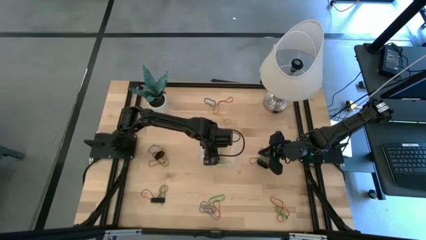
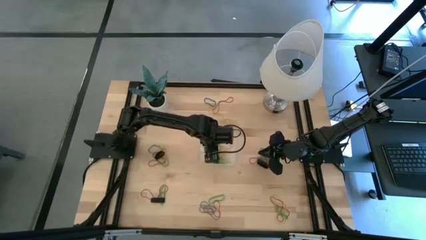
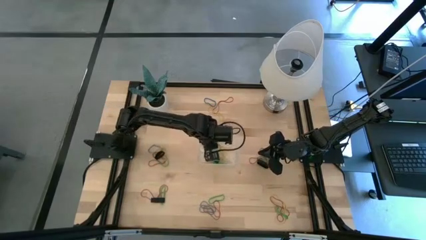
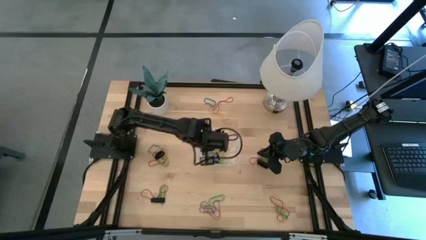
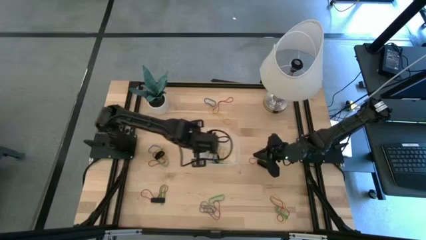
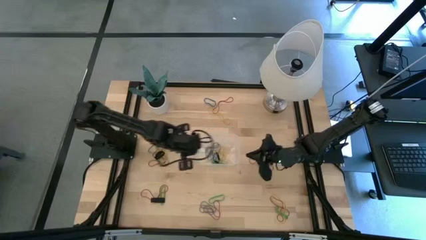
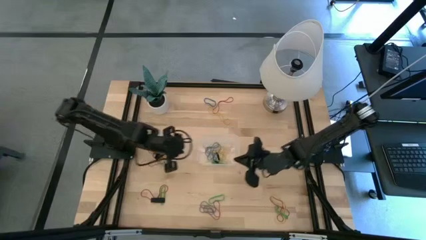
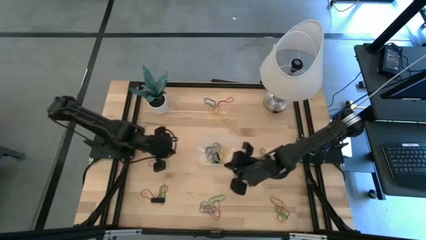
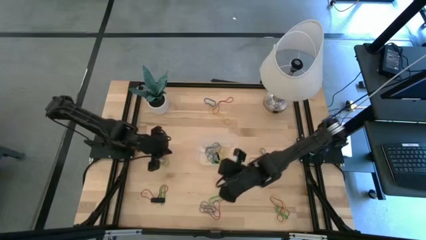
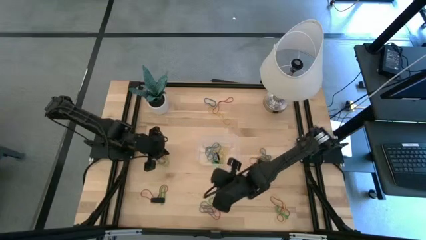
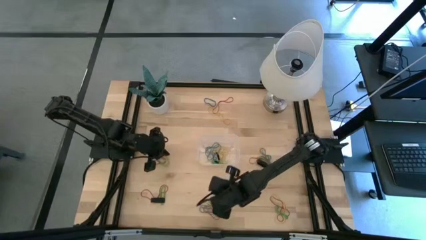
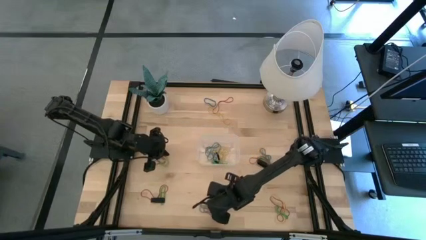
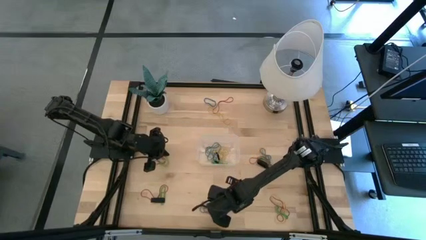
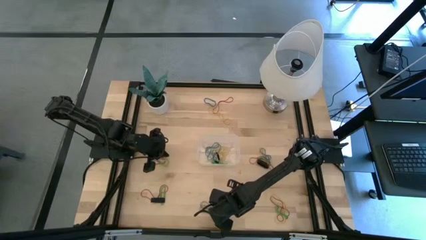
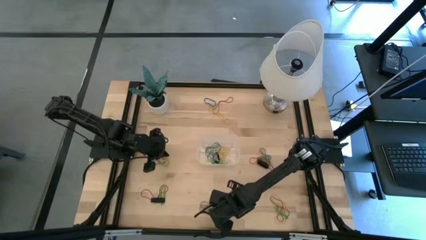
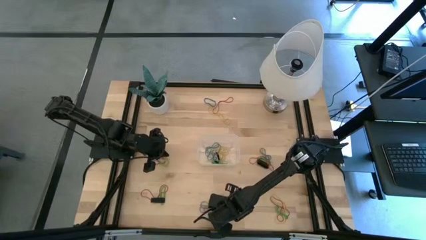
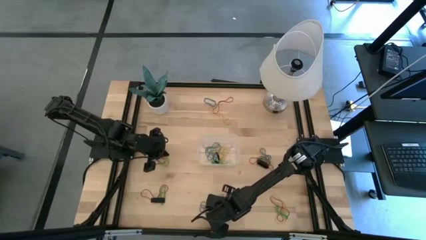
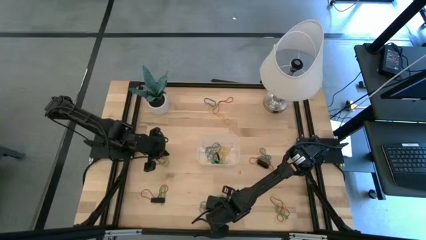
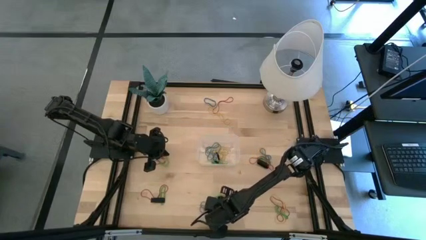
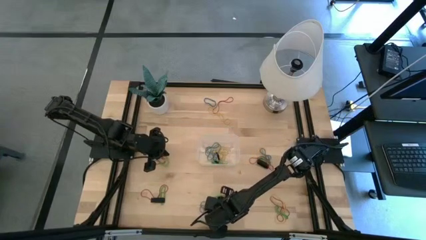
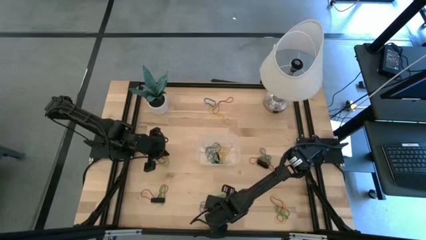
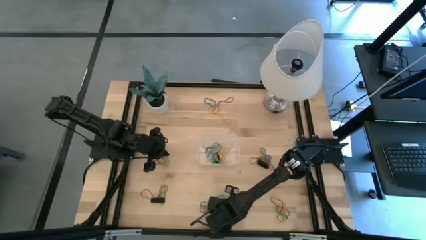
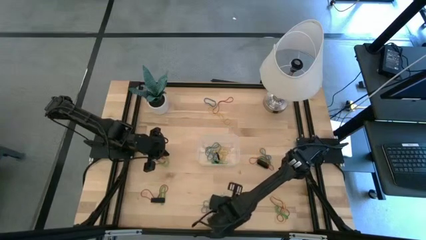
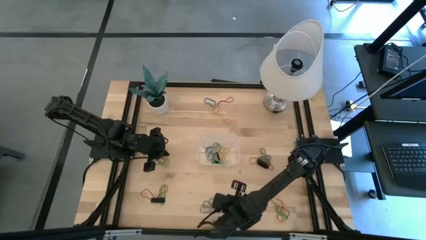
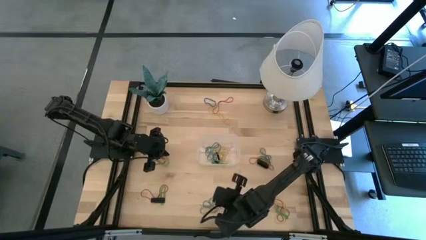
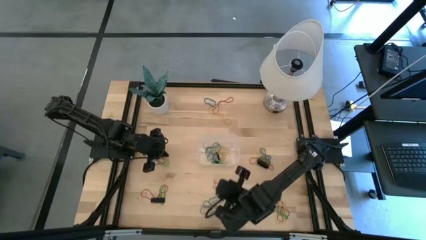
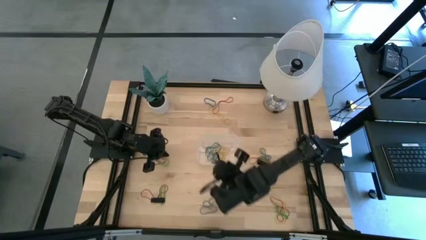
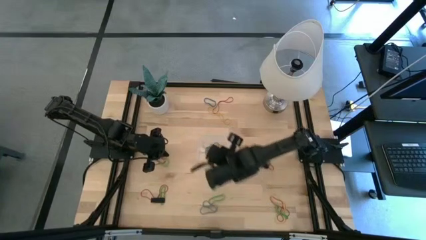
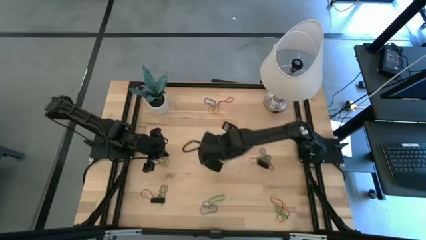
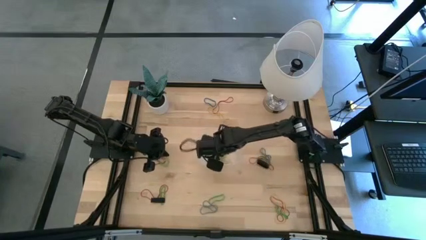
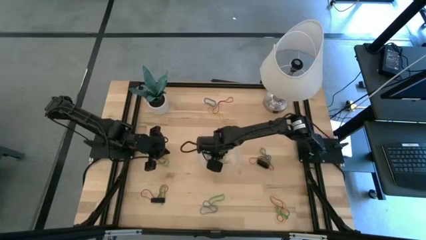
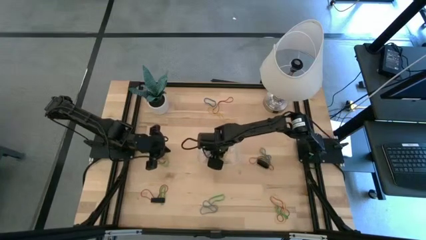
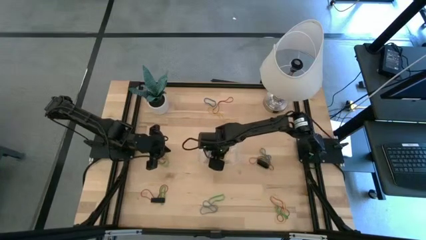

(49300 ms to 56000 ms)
Task: Pick and place rubber bands into bin
Put the red rubber band into the transparent bin

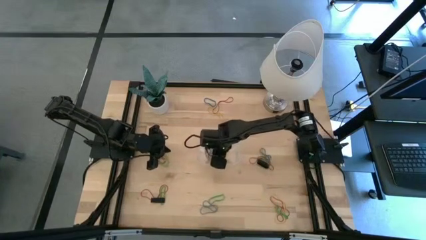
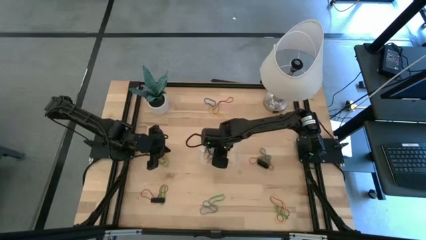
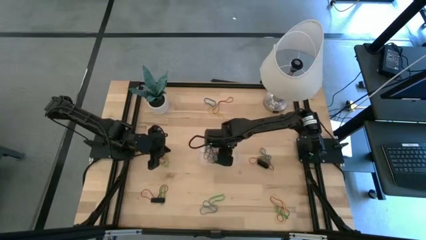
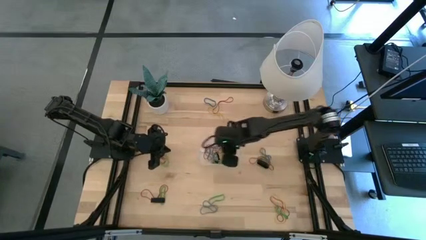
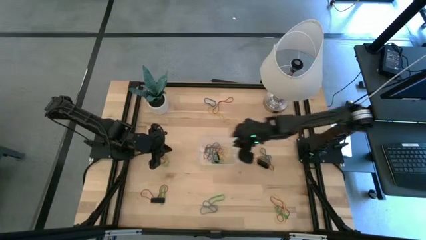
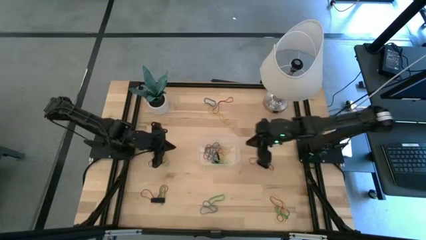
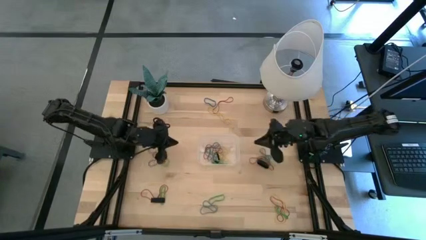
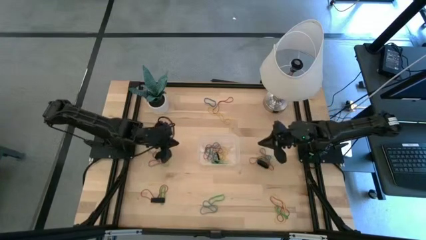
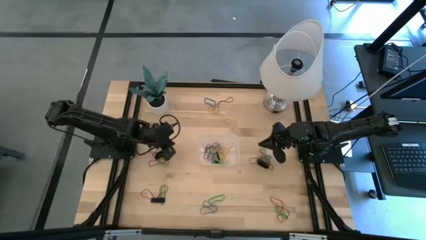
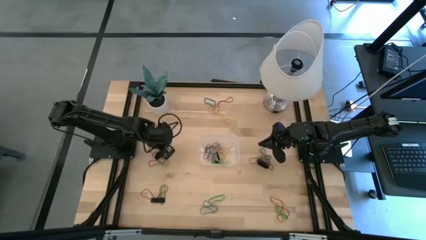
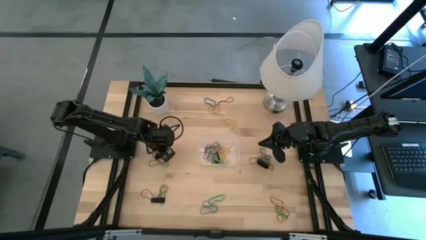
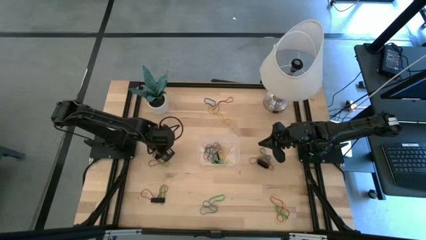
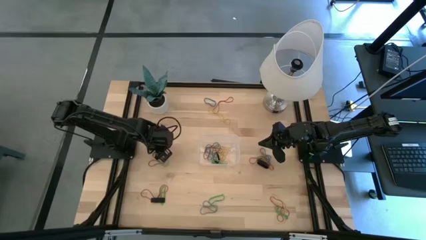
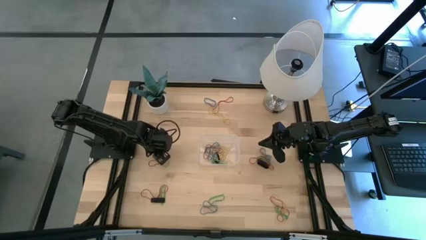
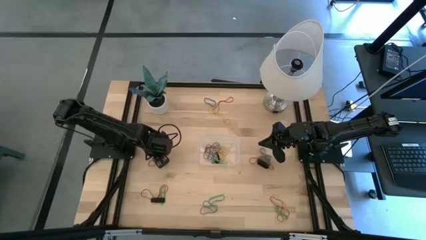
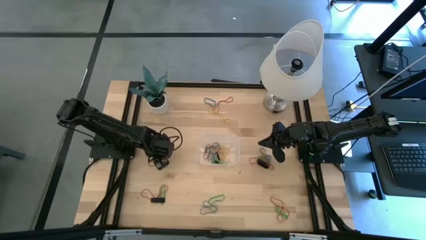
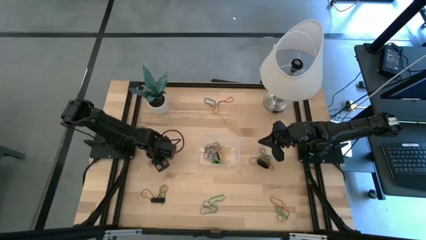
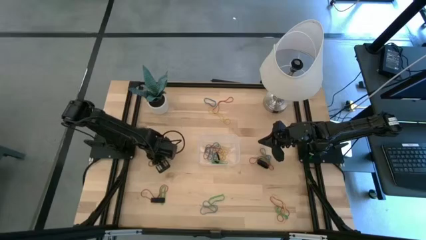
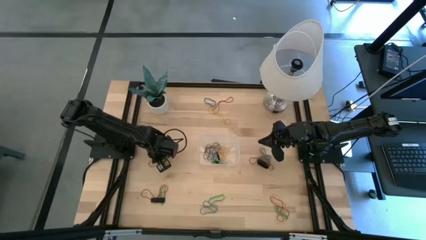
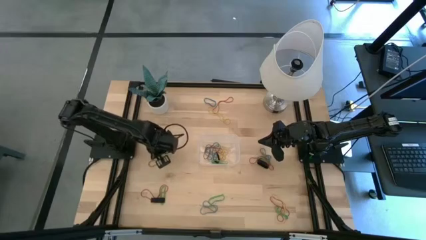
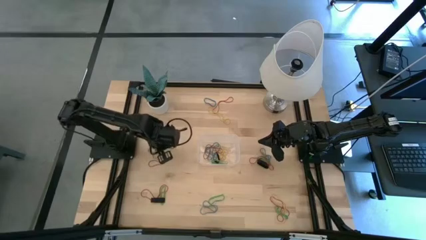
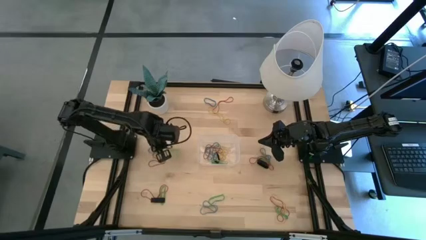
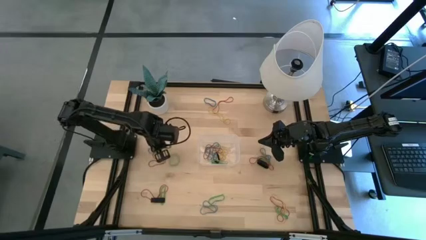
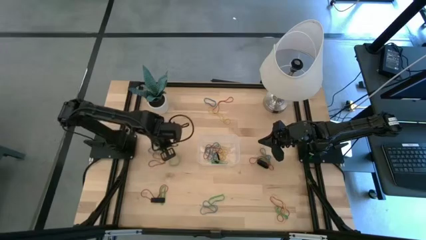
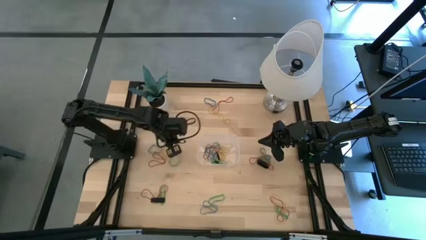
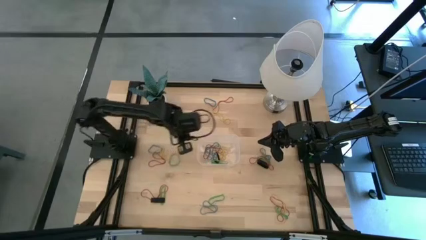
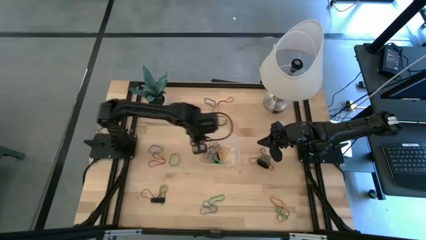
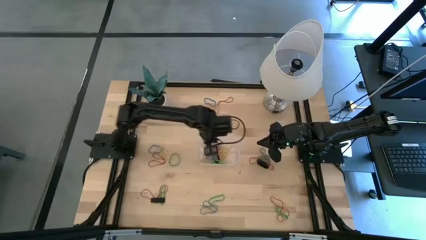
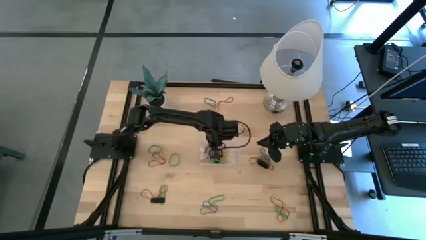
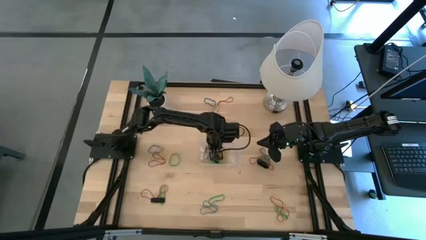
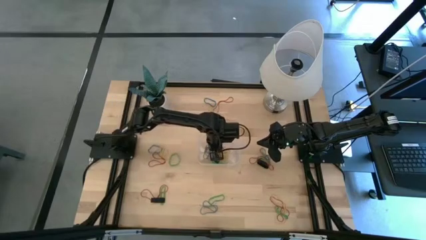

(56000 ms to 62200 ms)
Put the black rubber band into the transparent bin

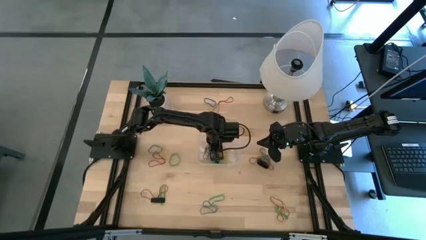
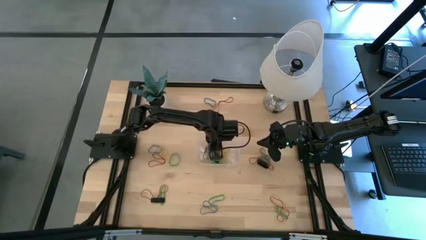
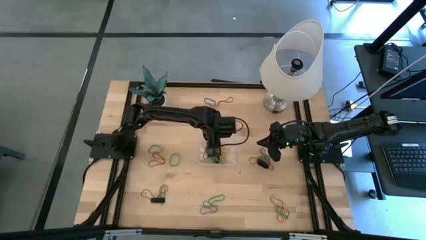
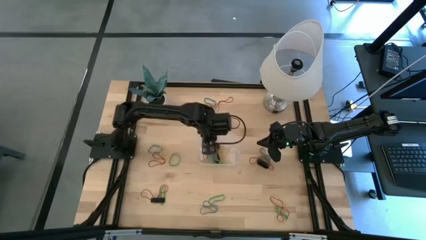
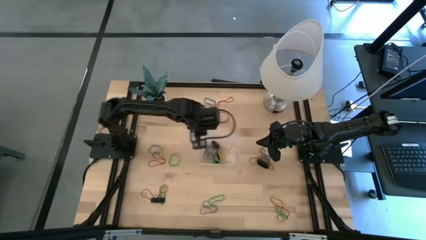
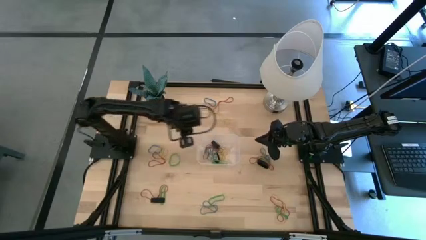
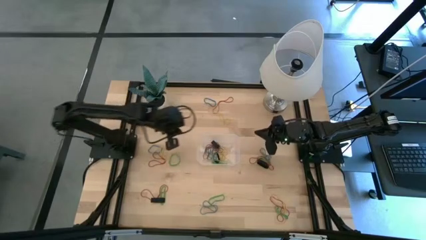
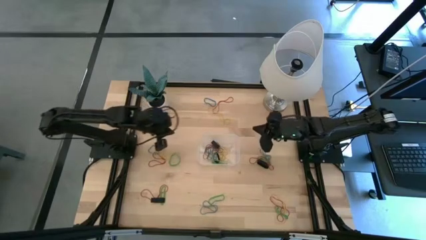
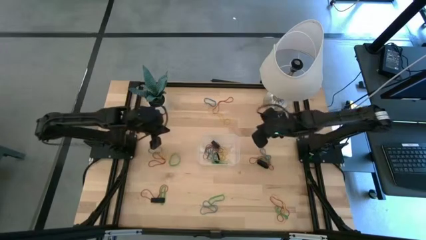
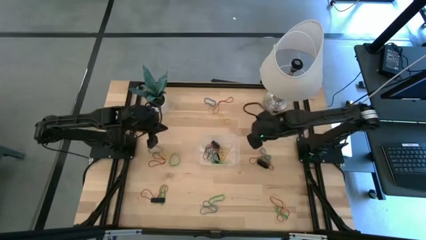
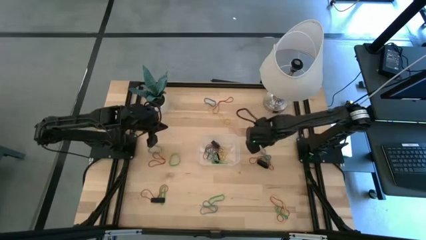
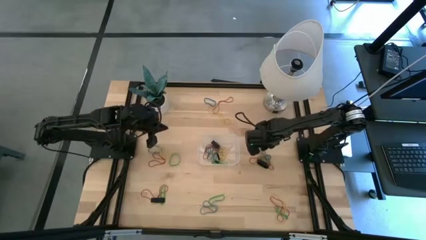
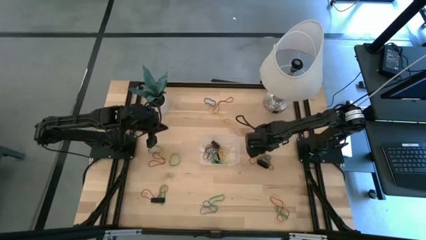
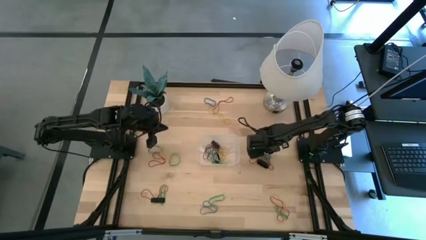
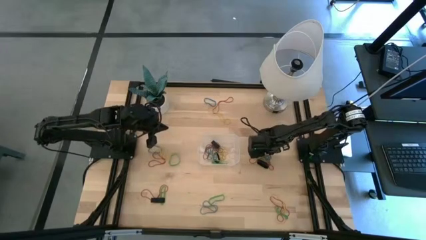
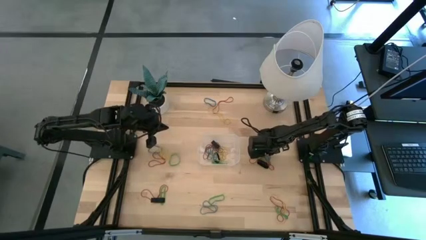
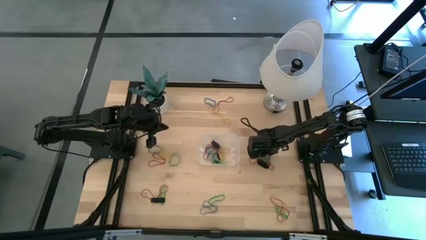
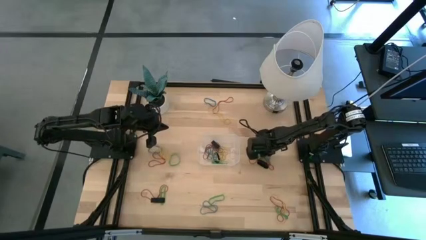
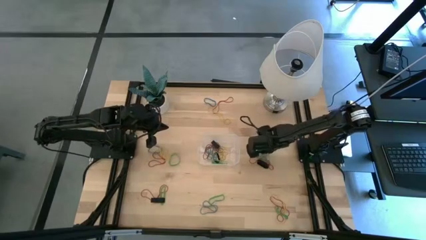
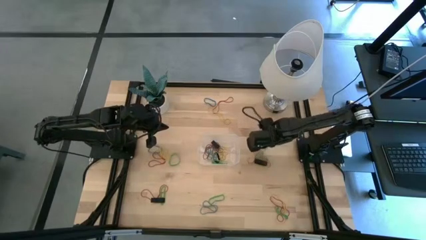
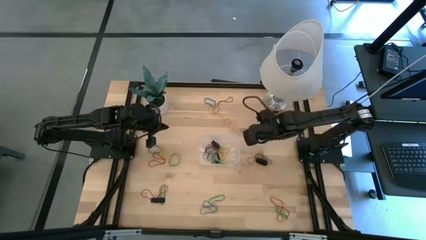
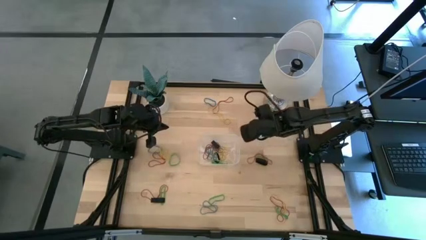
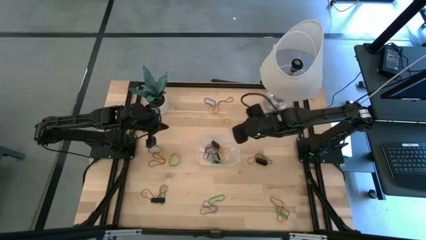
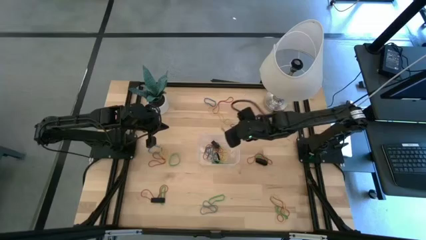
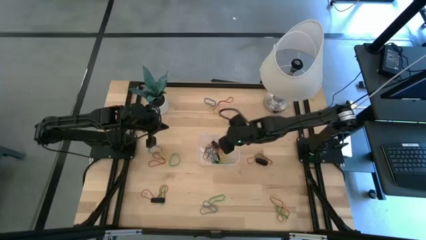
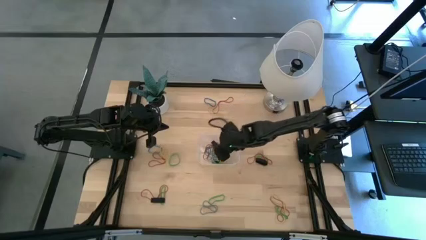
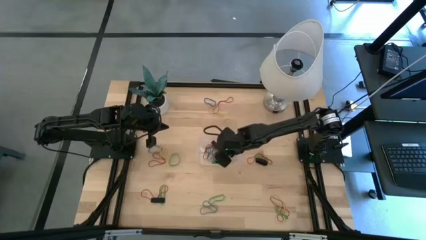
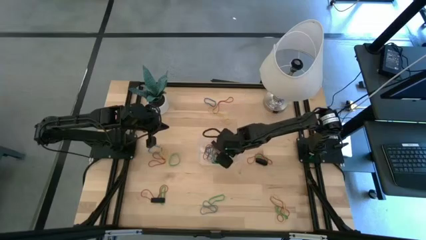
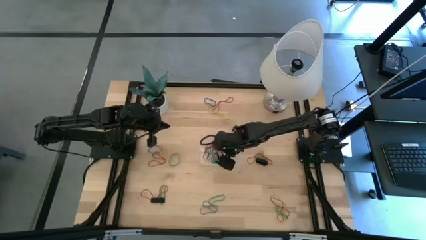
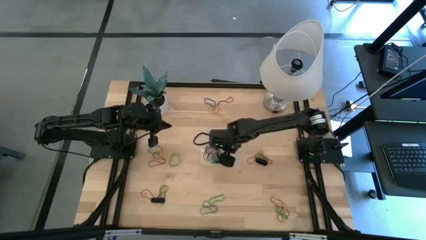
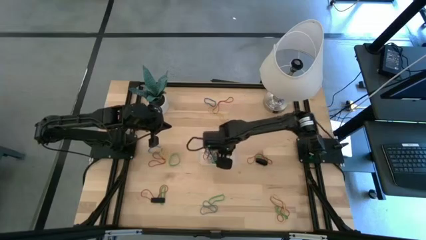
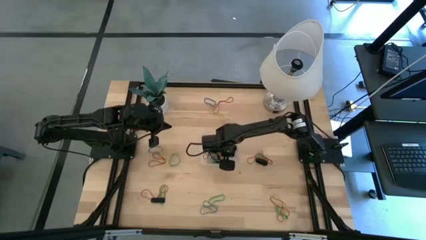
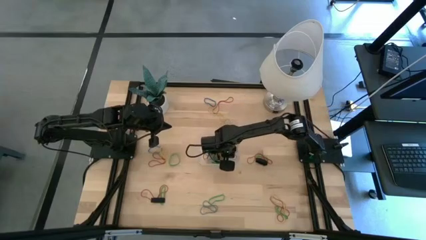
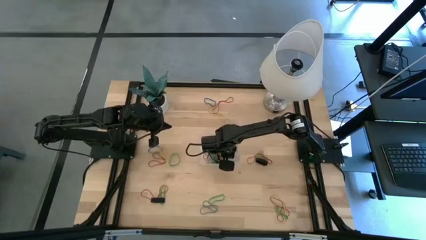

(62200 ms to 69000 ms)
Put the blue rubber band into the transparent bin
